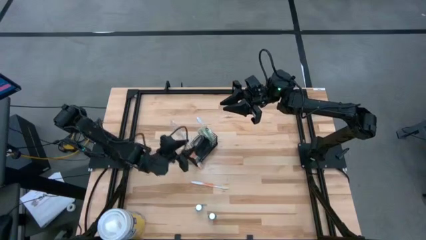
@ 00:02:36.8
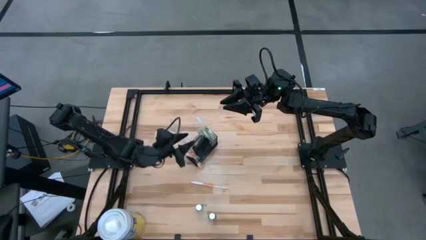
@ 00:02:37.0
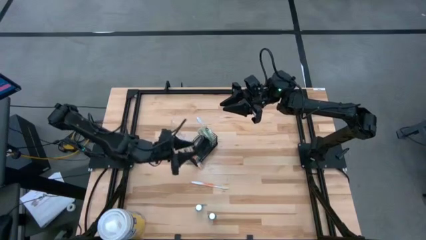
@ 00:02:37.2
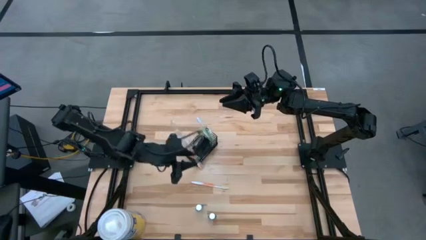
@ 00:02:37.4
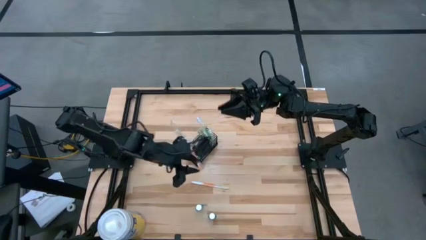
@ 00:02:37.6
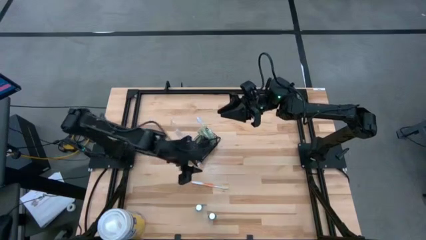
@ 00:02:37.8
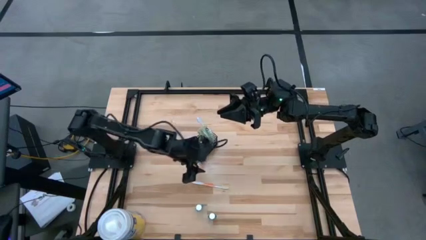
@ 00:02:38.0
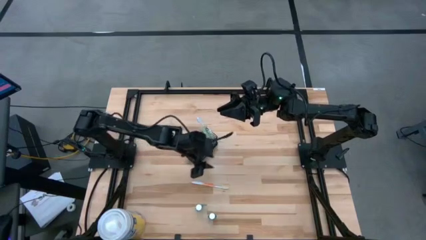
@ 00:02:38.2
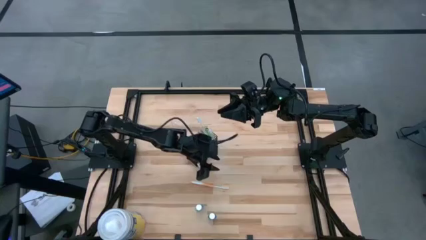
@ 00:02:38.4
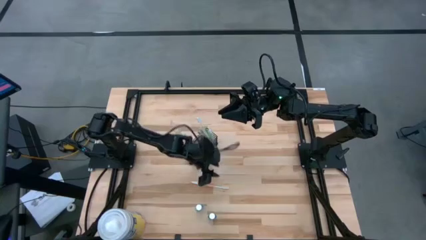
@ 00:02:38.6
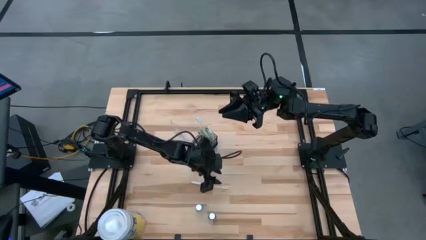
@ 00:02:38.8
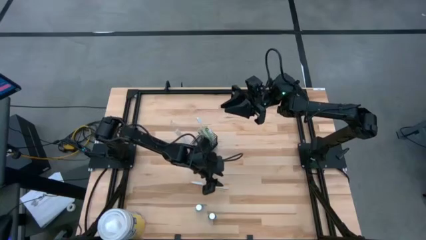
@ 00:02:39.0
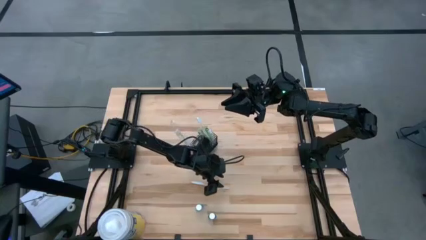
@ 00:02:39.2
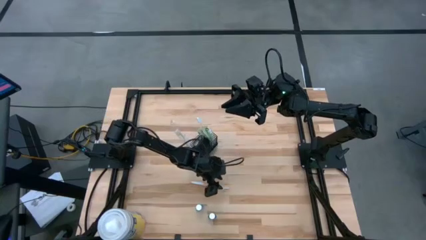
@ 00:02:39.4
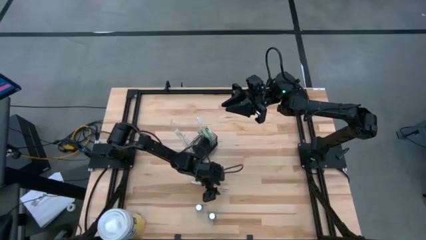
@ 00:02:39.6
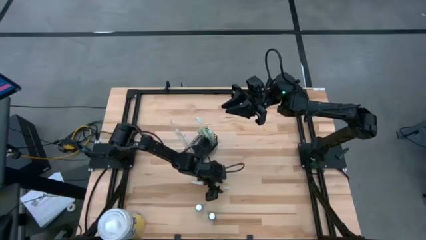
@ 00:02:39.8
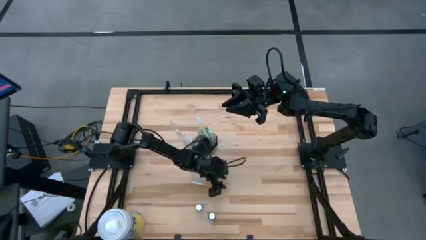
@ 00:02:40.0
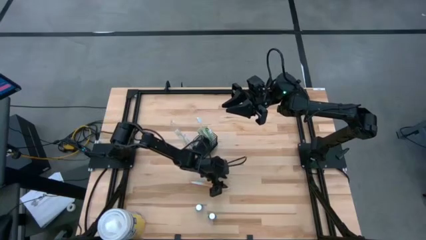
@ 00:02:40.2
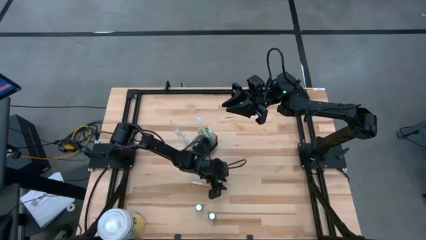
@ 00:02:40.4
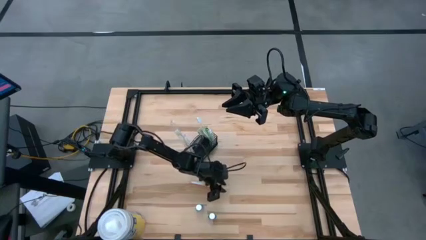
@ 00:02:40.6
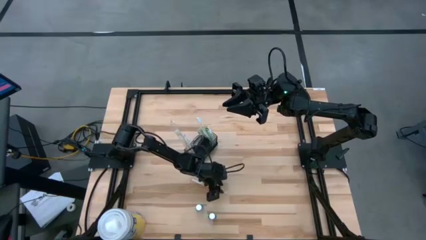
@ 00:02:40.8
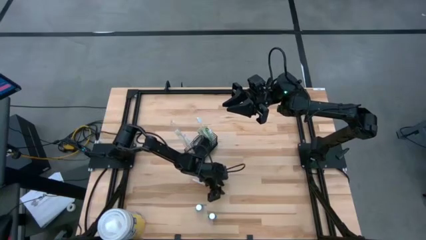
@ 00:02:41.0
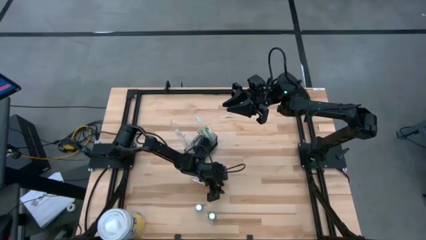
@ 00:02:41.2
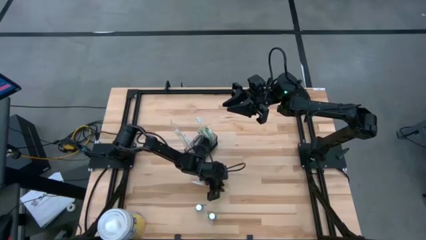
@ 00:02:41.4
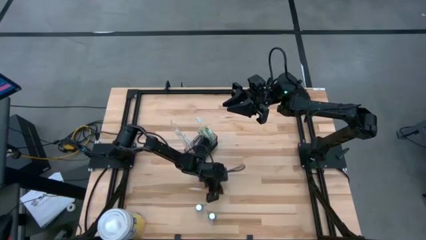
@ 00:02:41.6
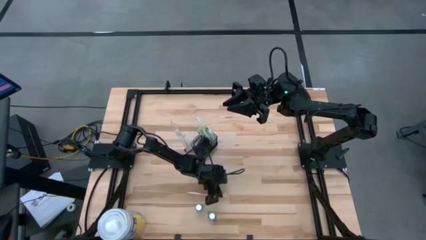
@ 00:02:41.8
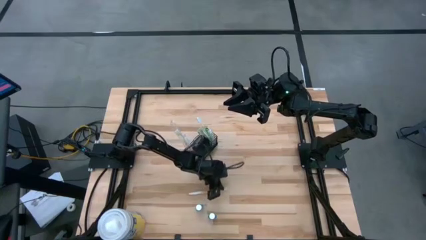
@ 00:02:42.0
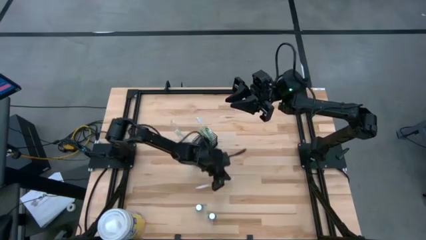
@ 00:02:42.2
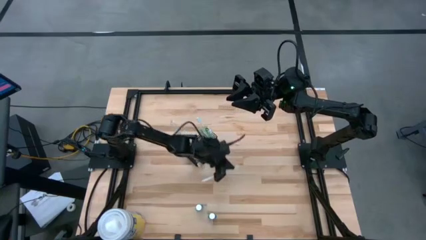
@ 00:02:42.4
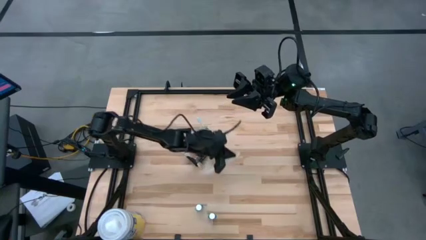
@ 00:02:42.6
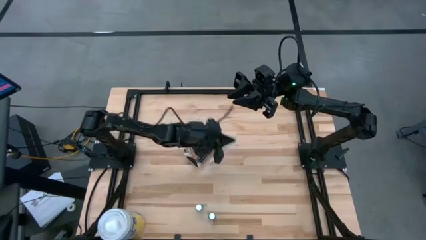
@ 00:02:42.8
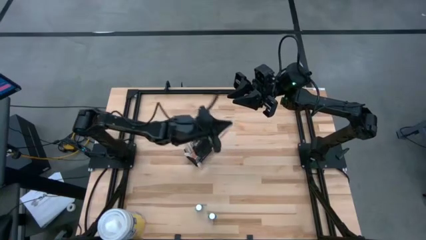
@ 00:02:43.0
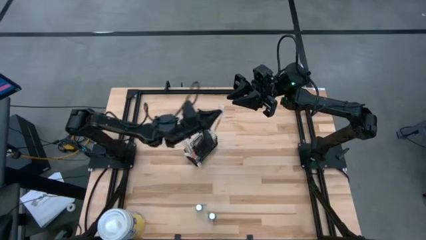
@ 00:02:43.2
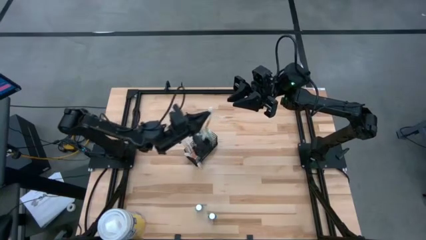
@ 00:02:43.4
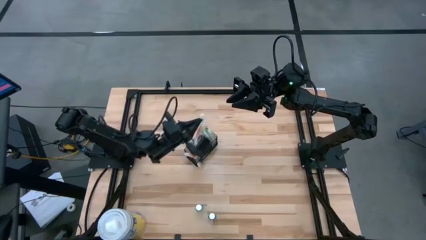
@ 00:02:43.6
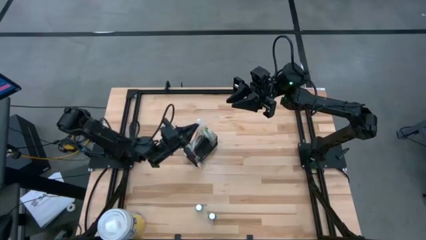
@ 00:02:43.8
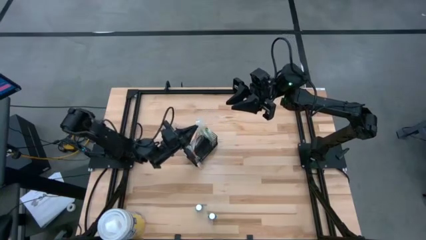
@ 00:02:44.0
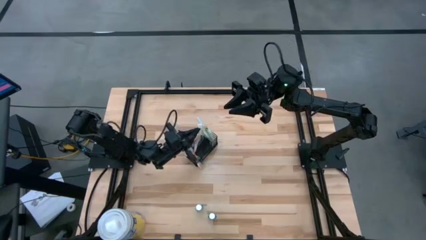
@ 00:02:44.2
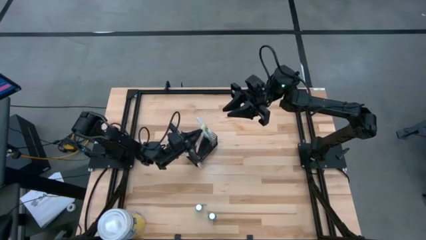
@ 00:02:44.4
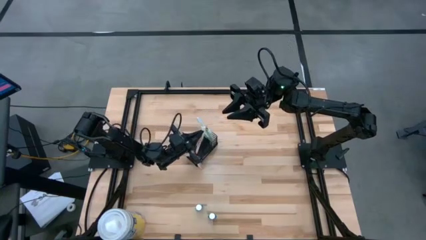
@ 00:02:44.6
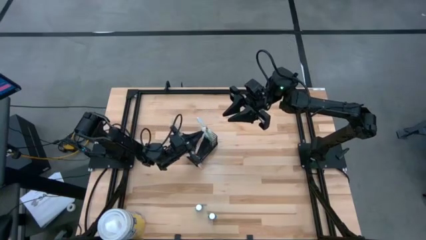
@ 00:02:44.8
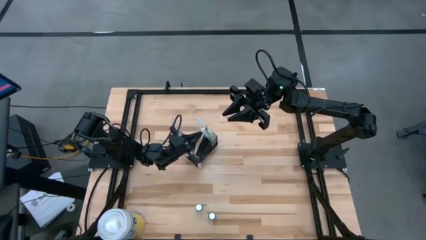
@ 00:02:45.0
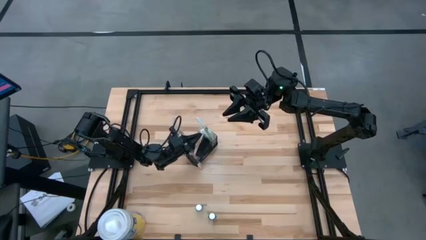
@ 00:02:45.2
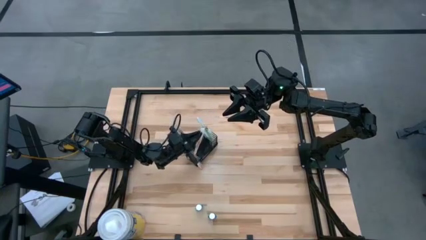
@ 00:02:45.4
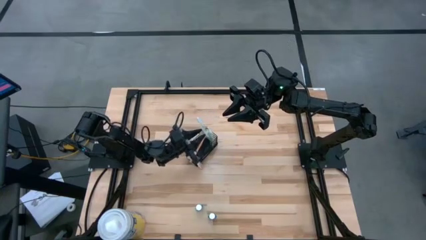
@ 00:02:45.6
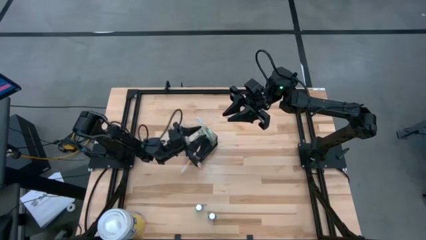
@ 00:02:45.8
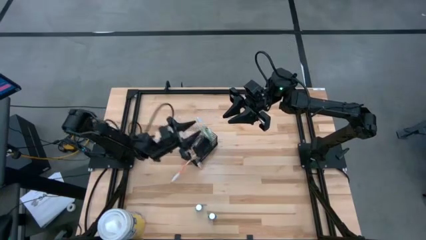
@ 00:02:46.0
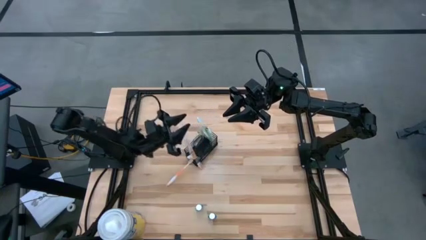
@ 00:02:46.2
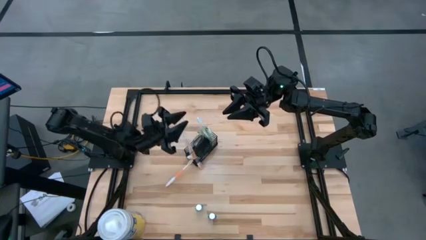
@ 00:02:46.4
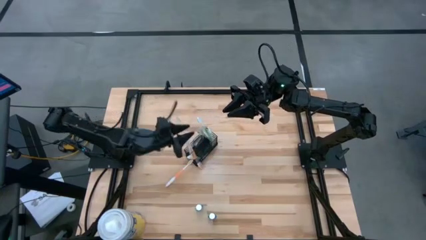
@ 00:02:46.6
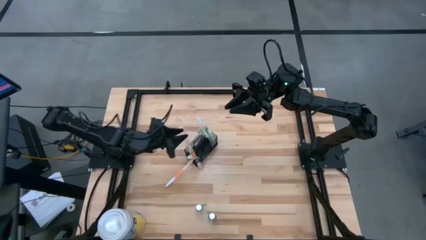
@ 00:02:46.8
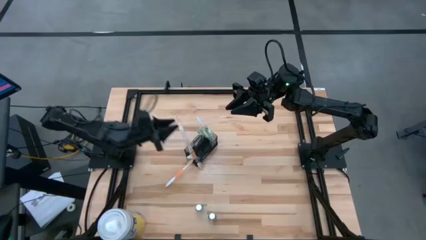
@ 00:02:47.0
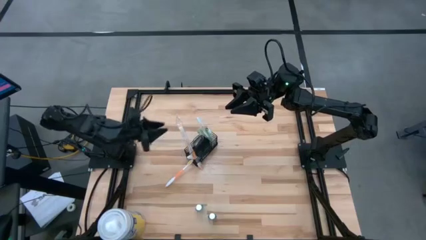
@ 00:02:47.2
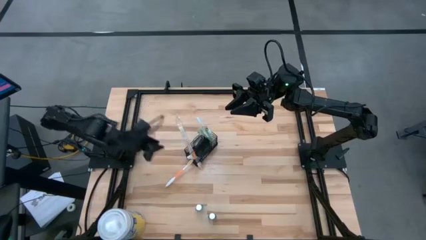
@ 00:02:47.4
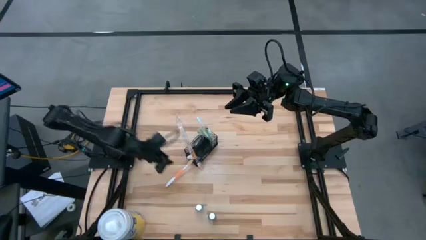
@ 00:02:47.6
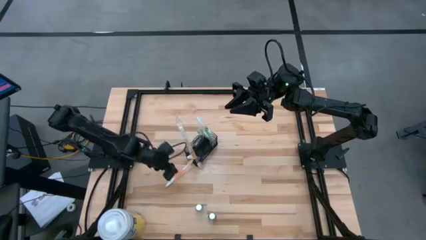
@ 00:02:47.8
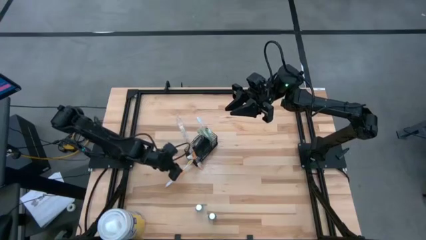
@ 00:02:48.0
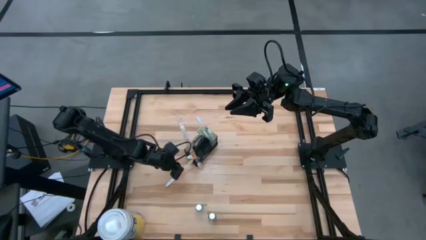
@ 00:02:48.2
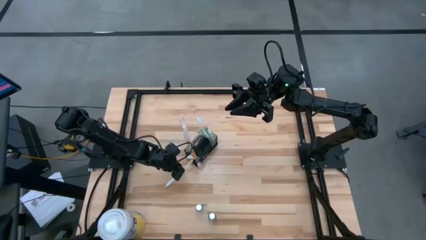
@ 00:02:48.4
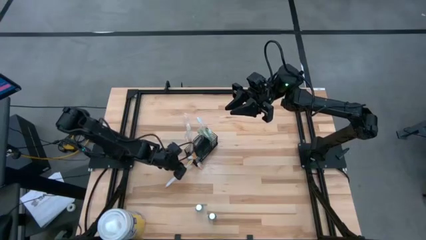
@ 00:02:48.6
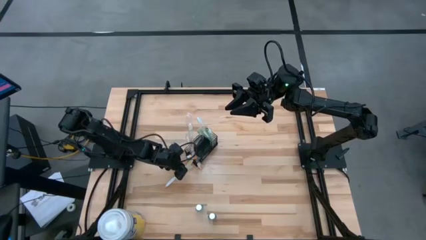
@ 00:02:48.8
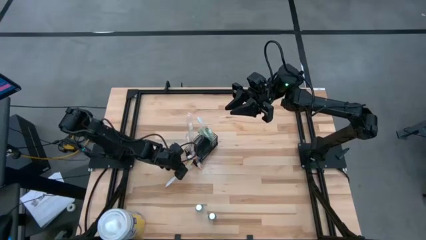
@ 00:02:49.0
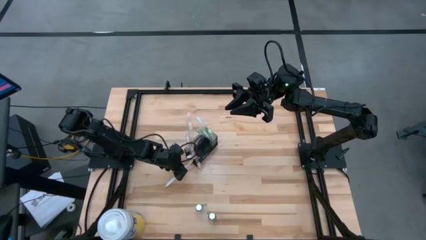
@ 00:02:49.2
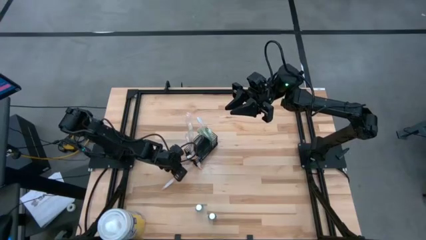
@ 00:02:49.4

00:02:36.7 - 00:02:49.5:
Task: Pick & Place toothbrushing station
Put the orange toothbrush into the wire organizer

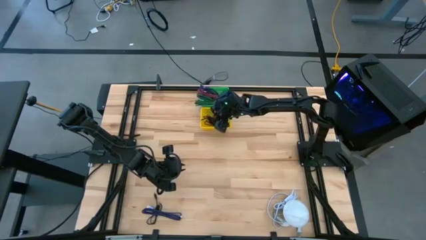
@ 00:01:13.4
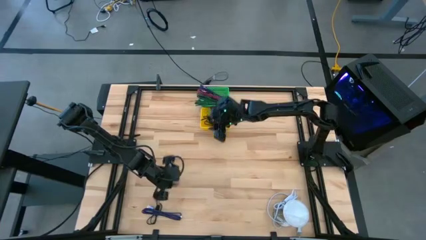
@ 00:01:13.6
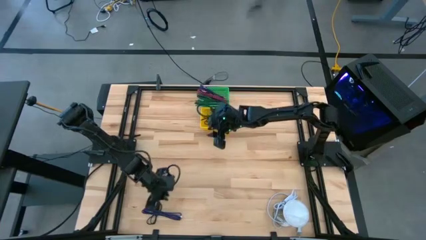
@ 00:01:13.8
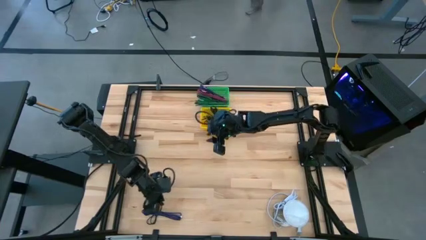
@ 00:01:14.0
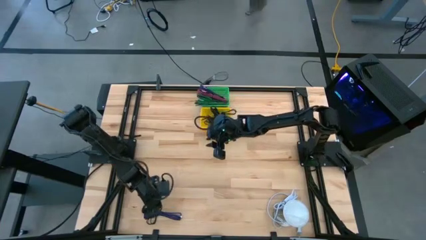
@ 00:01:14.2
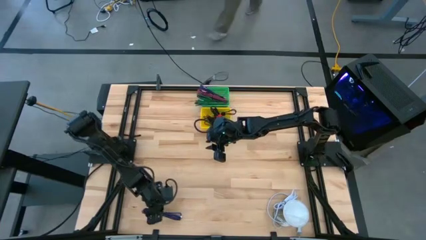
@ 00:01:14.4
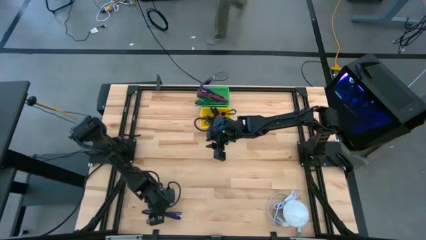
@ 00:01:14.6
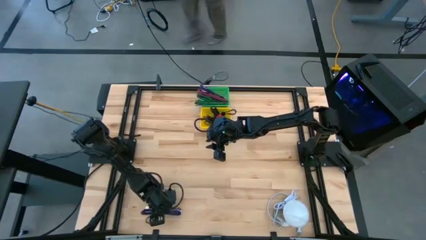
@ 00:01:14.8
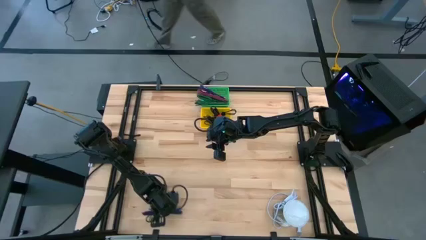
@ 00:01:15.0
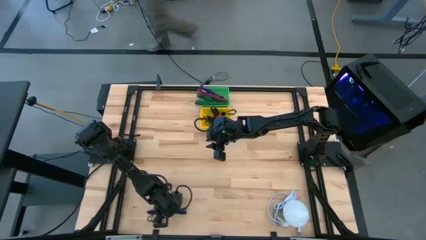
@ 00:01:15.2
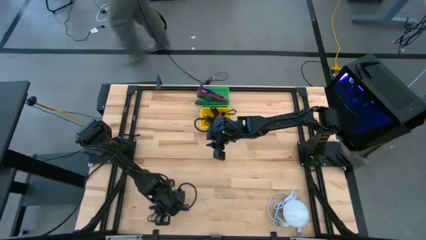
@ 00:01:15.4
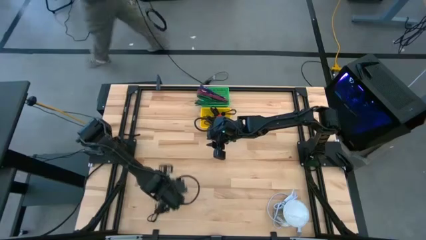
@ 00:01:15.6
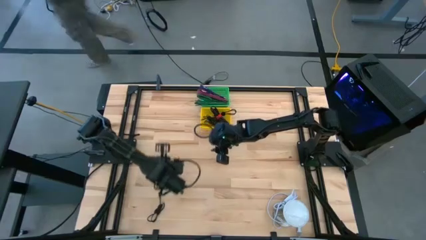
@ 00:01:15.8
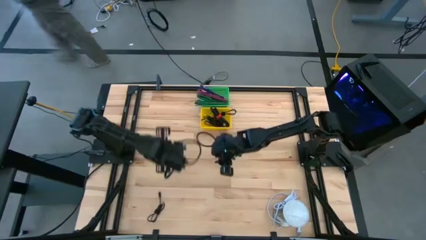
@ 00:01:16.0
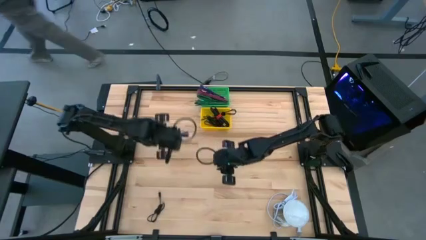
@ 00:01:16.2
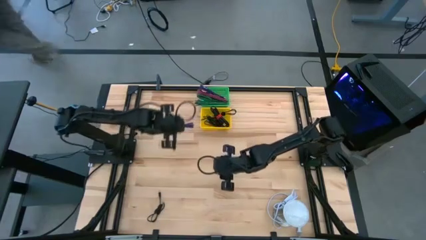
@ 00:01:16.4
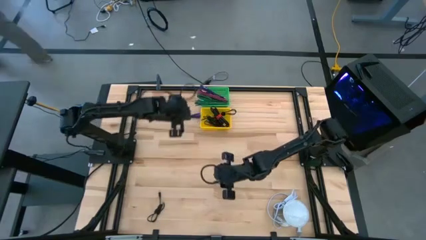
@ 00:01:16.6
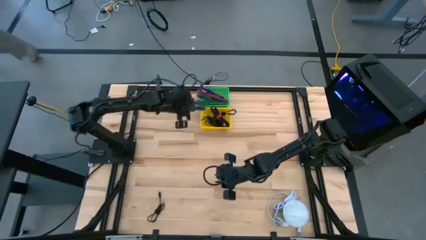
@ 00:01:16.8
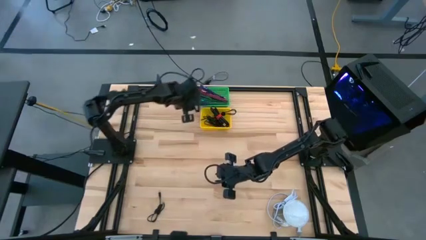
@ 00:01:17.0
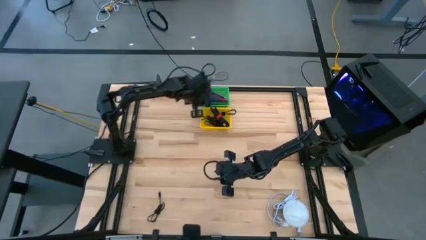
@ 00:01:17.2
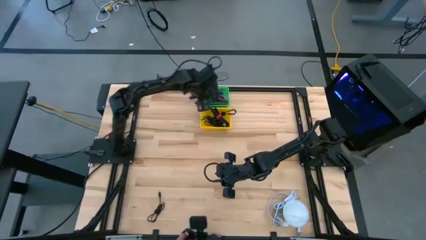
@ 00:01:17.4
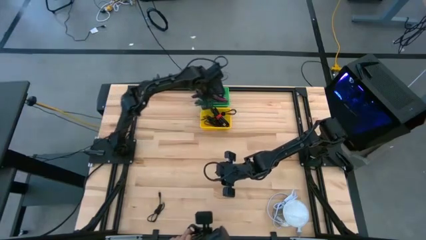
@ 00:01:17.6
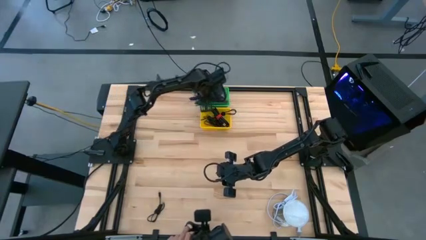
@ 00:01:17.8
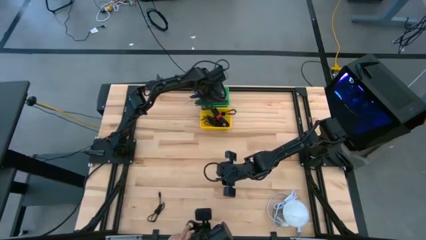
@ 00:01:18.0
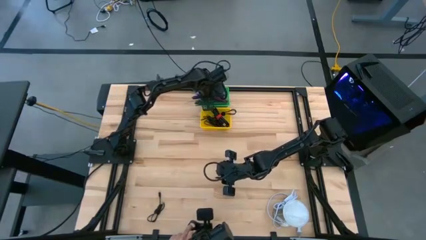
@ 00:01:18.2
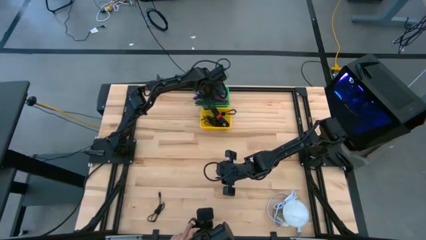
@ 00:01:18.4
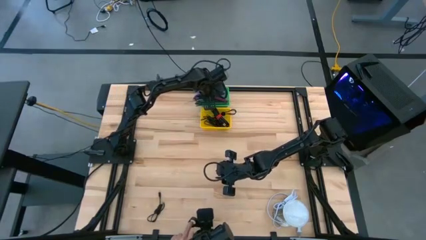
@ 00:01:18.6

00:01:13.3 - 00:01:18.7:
Task: Pick & Place USB Port
Put the blue patterned charger cable into the green basket
